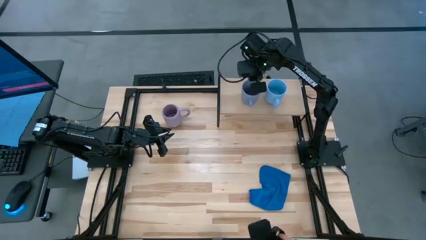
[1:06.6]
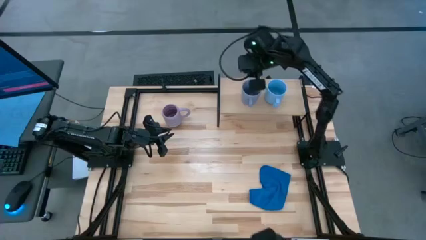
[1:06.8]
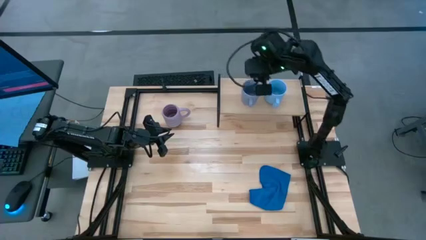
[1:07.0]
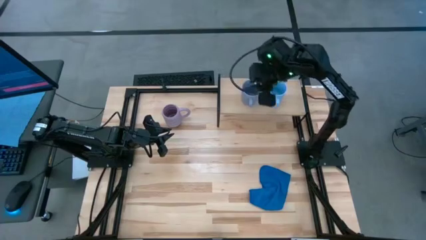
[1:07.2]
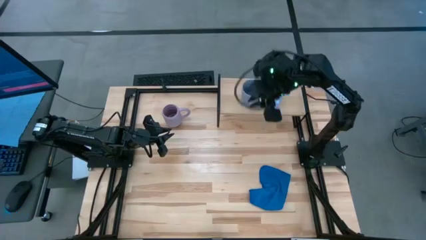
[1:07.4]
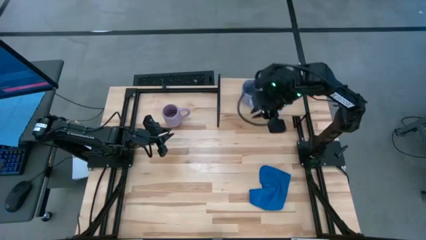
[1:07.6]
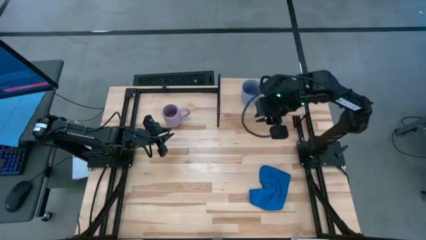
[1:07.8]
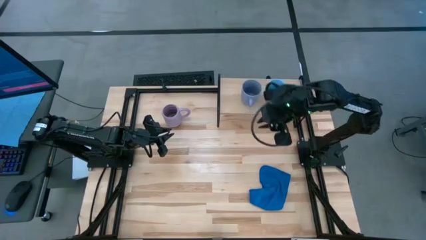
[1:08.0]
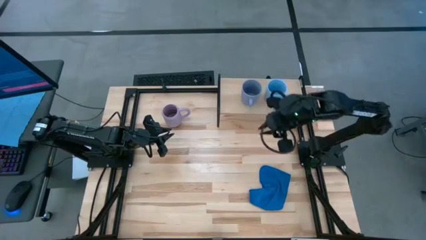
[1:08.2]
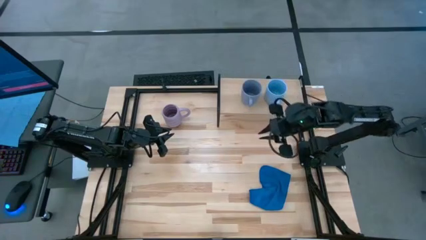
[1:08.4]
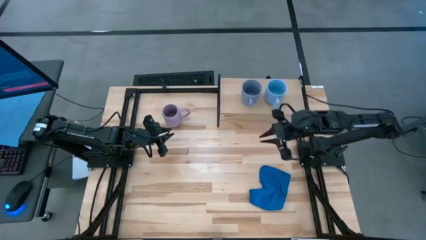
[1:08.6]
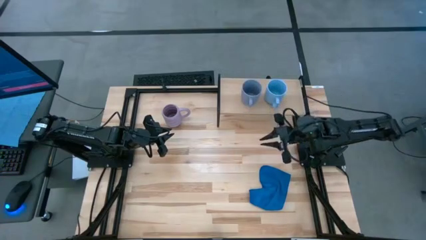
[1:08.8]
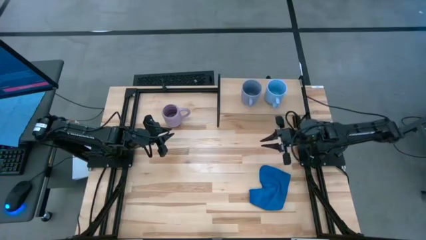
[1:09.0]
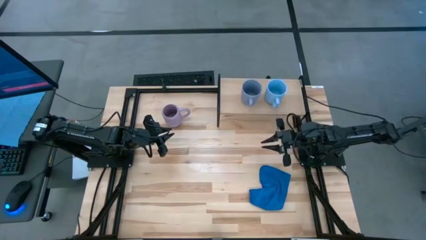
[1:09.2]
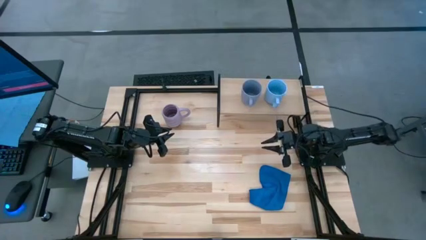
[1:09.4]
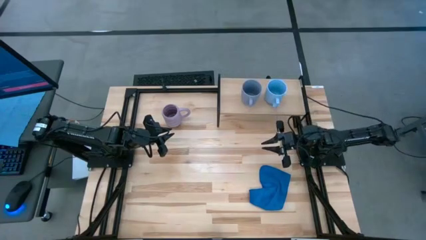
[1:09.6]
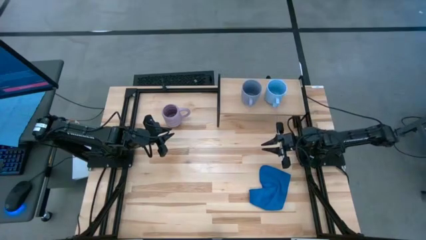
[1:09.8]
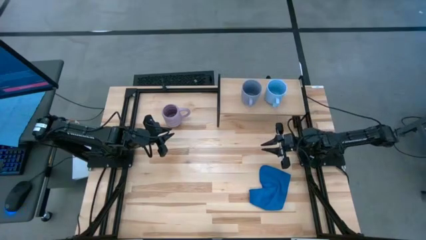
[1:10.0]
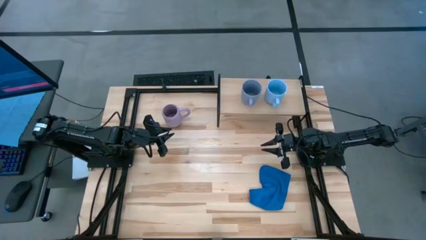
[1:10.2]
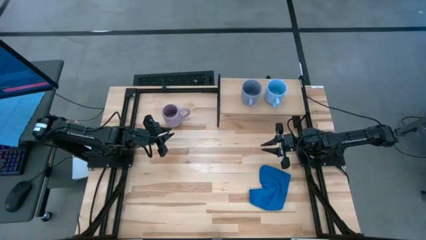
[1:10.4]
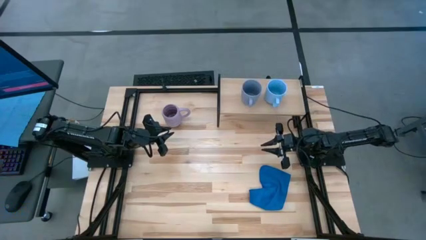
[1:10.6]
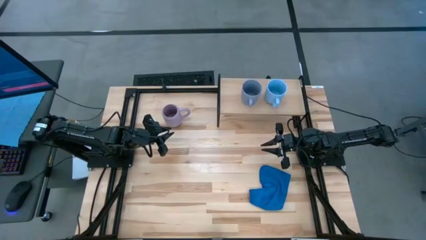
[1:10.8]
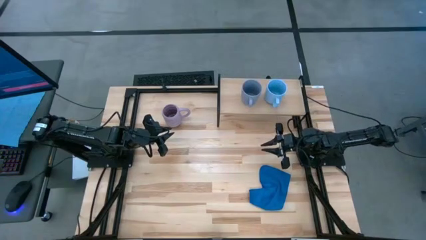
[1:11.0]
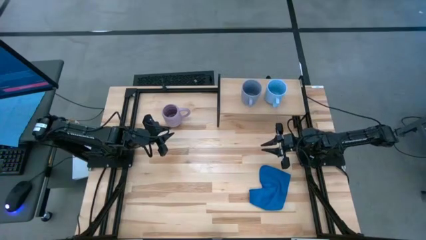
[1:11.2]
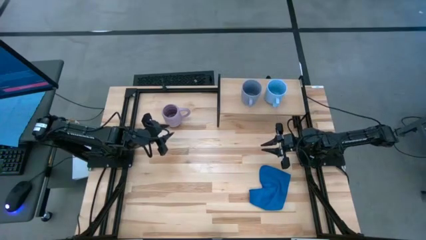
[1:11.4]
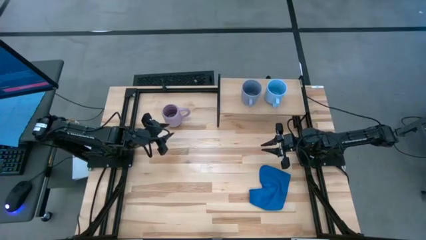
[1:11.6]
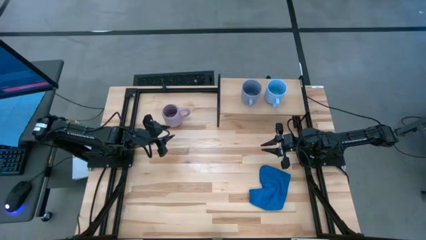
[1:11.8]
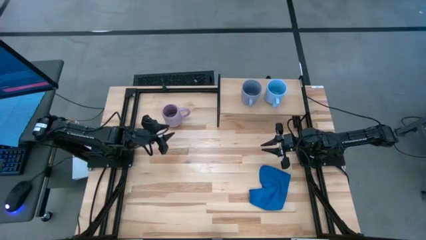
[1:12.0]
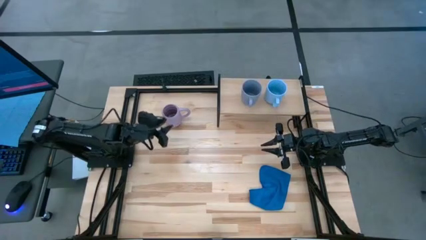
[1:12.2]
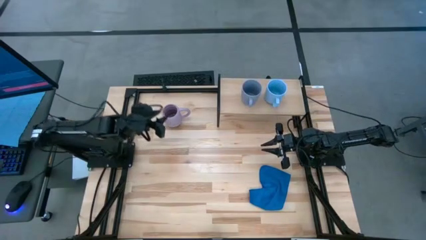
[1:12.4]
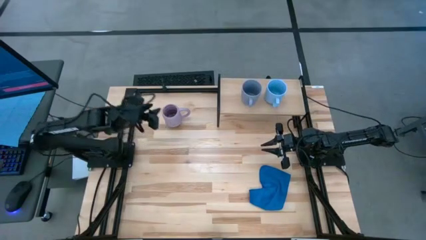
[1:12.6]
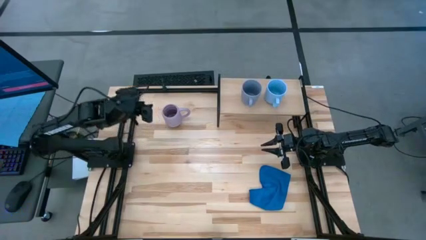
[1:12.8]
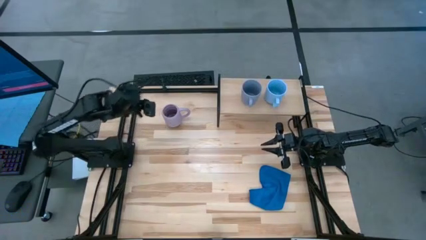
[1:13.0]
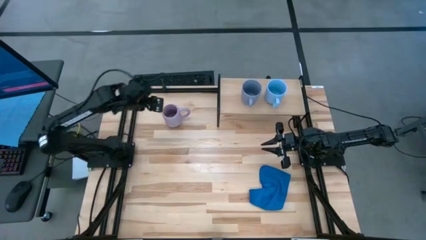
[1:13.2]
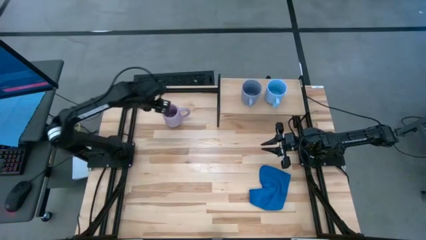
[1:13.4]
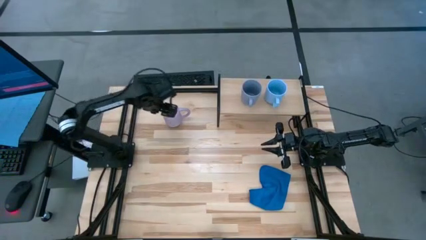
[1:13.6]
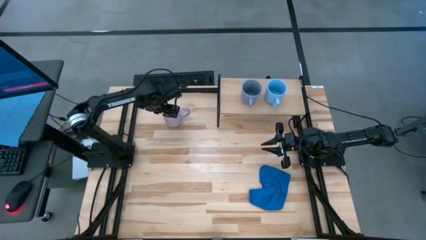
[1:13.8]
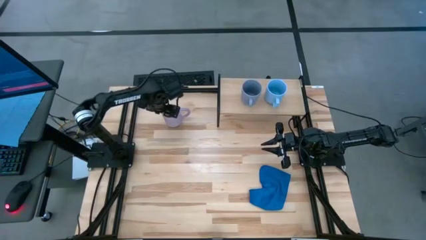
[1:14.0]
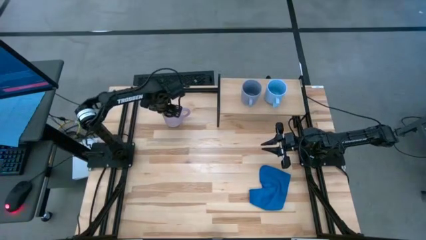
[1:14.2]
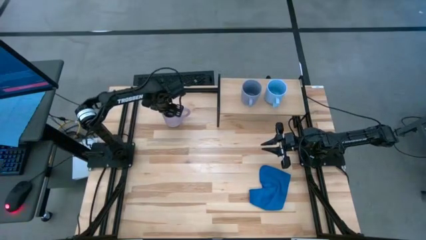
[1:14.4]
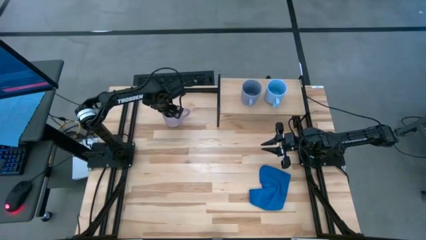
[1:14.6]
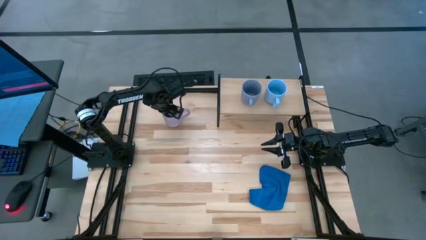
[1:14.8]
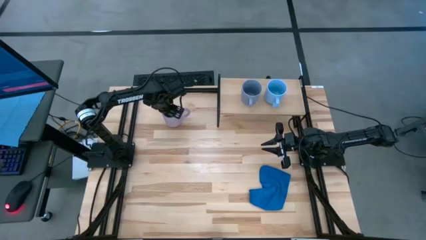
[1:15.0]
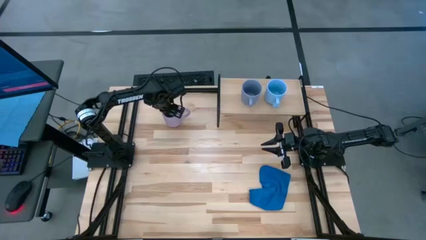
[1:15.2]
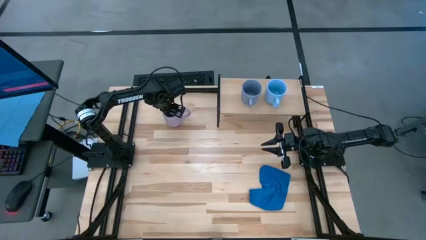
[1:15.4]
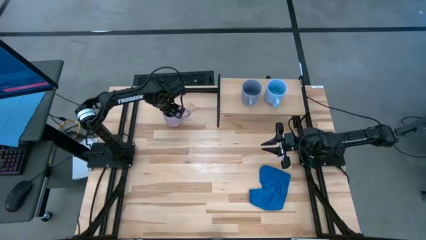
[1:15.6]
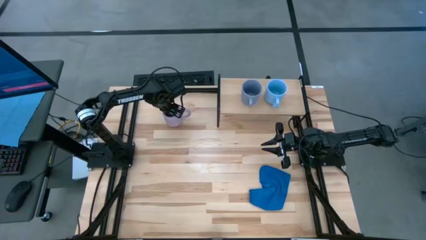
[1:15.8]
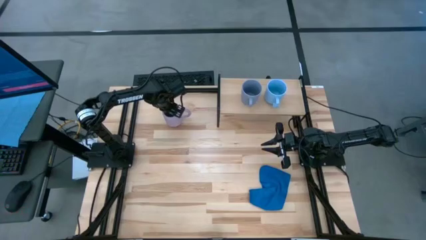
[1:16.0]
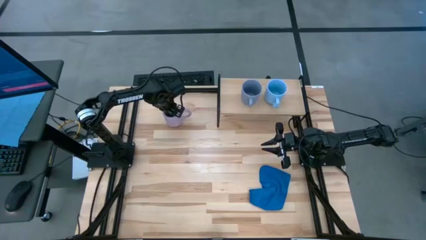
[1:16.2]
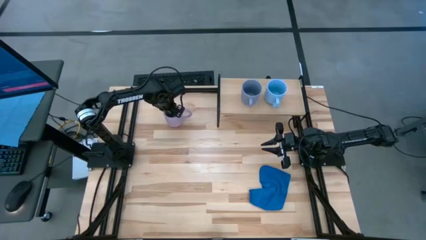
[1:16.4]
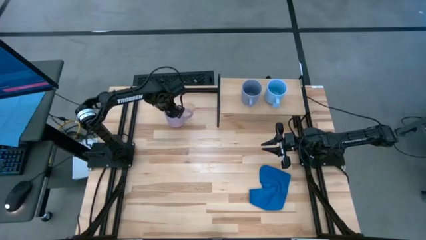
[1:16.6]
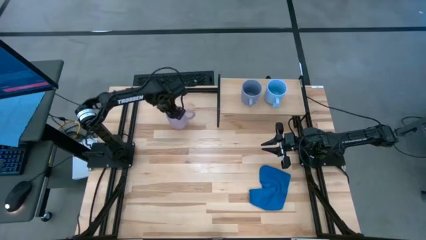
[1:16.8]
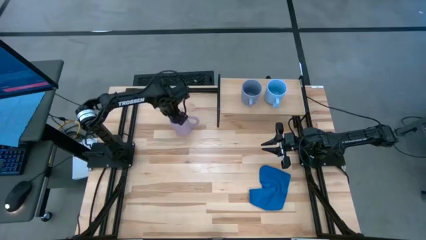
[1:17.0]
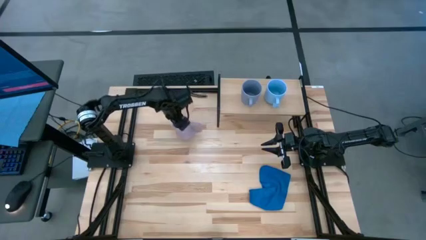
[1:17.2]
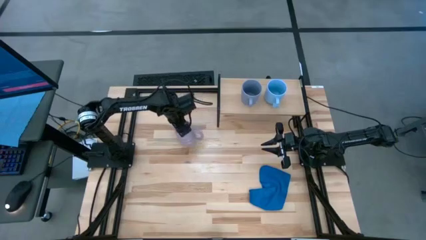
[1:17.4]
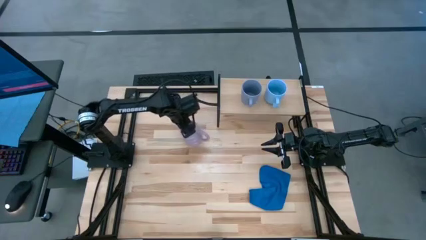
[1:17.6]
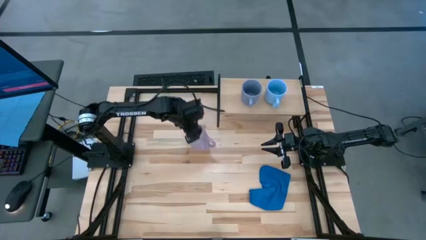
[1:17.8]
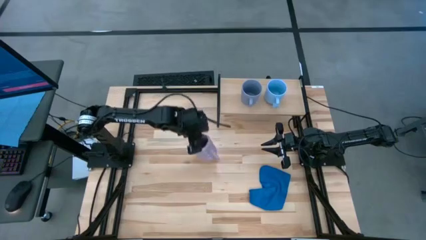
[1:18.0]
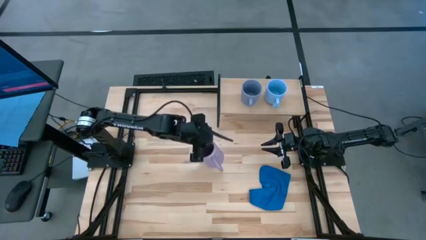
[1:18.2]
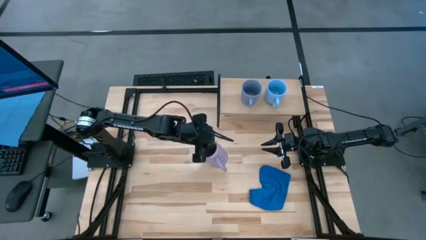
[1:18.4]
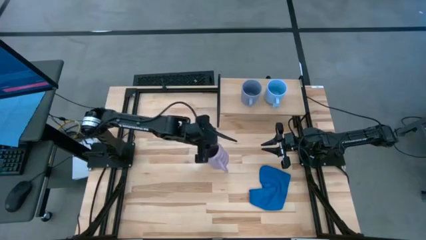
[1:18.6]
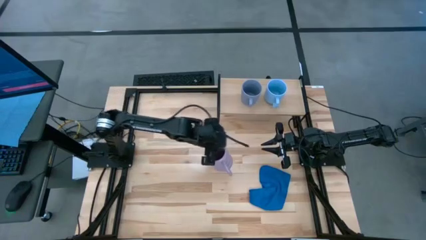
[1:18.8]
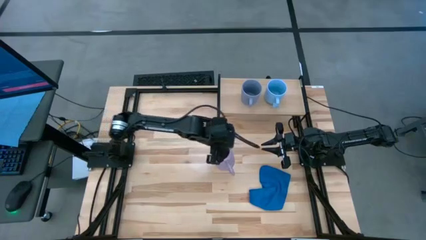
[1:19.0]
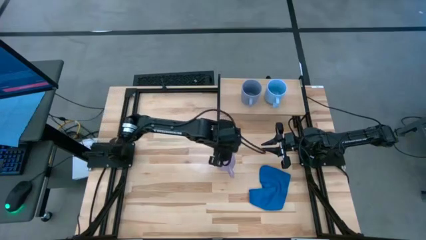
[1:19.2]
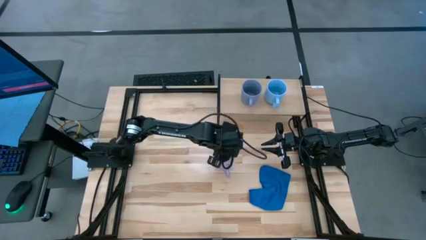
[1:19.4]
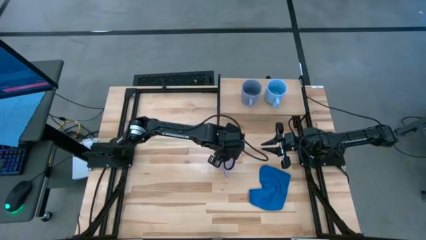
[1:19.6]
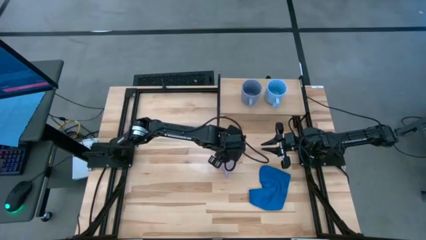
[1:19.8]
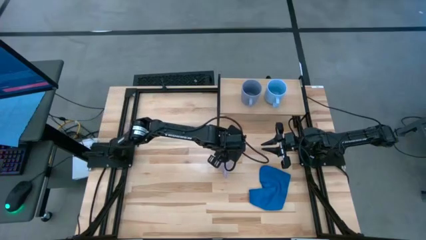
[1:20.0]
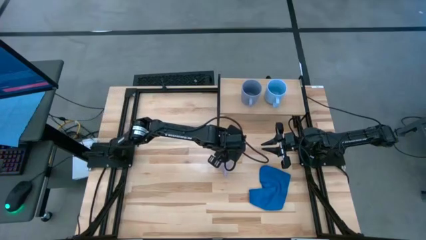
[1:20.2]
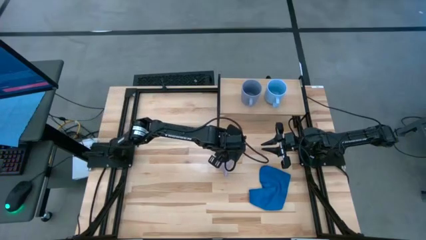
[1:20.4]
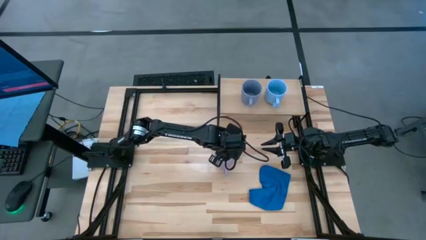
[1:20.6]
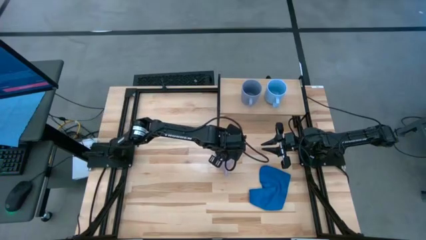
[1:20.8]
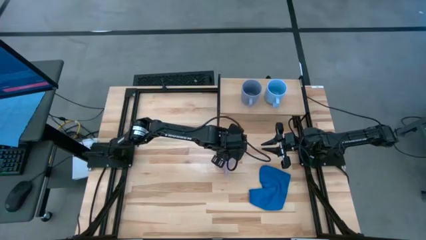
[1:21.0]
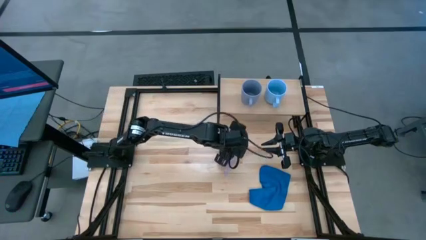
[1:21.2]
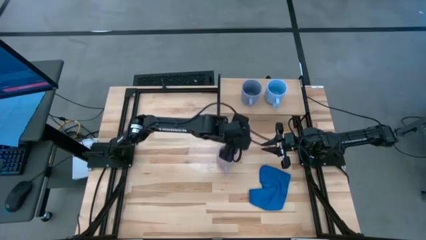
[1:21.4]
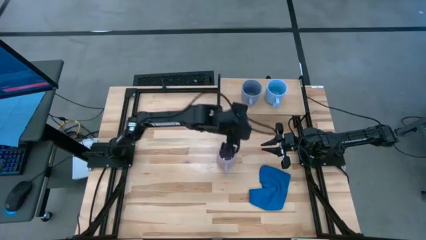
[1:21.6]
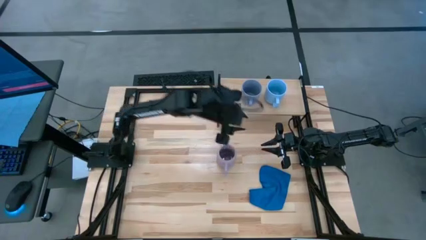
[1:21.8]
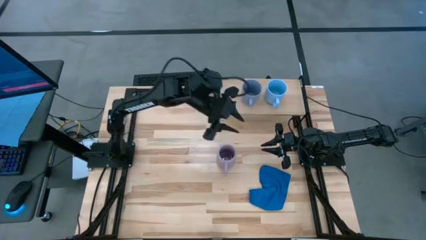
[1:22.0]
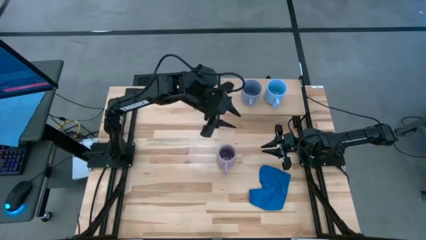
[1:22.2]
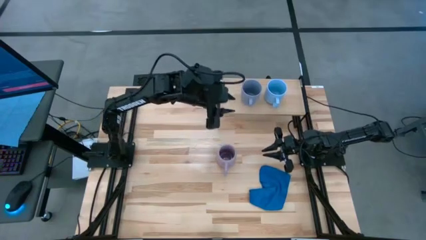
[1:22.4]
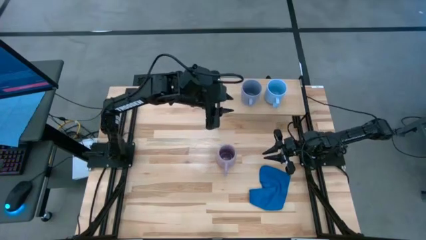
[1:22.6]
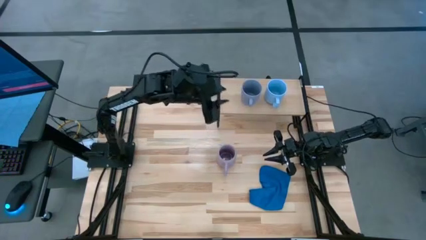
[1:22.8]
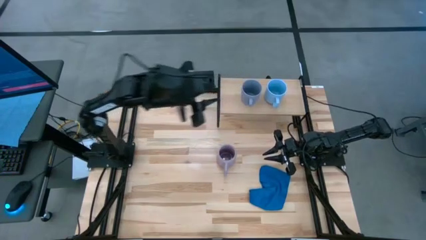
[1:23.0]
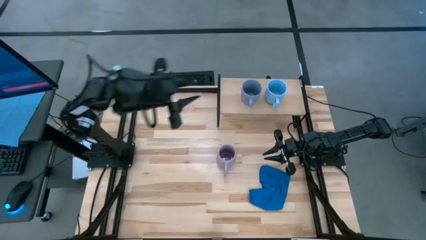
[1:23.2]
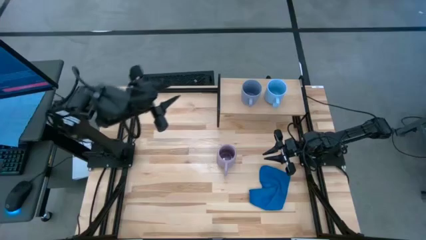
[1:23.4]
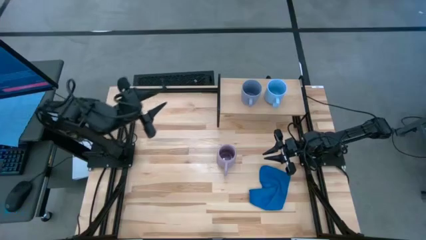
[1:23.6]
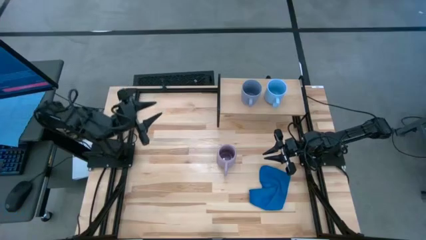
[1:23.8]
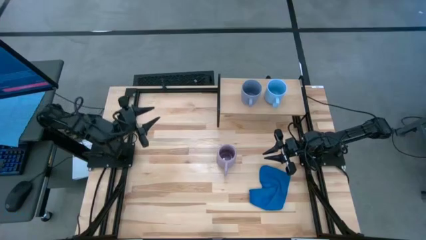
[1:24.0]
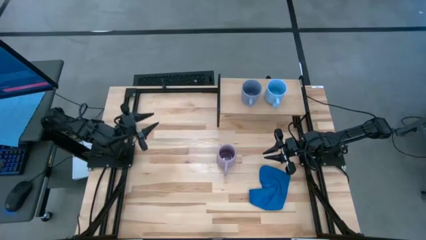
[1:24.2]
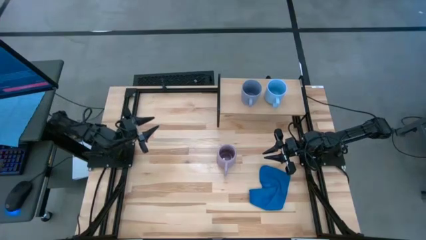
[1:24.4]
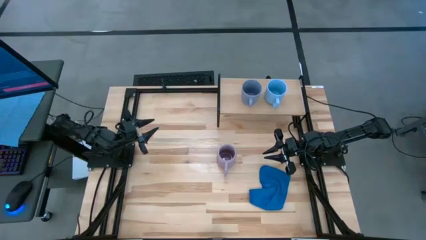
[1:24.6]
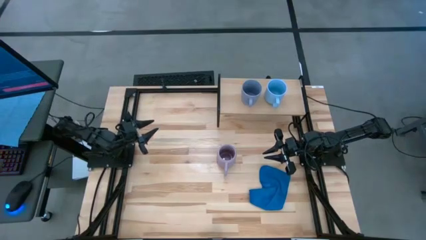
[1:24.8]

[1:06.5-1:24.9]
Task: Stack small to large cups/mugs on shelf
Put the purple mug on the shelf
